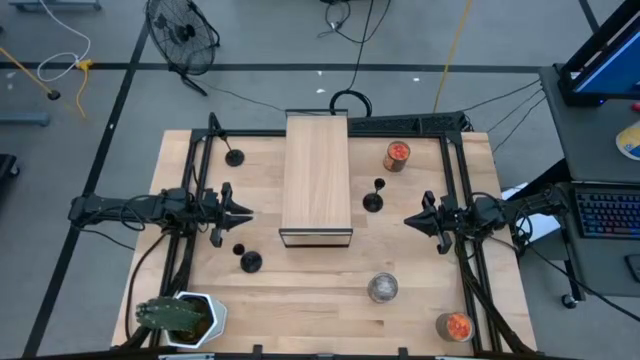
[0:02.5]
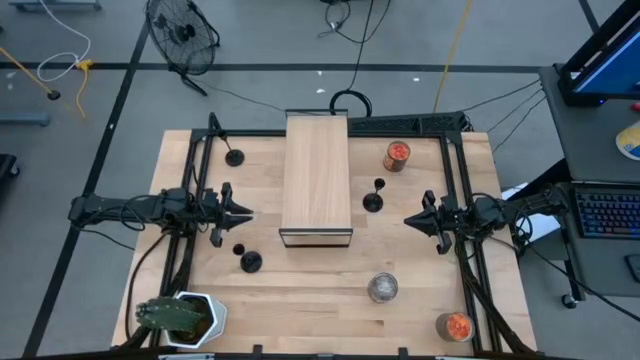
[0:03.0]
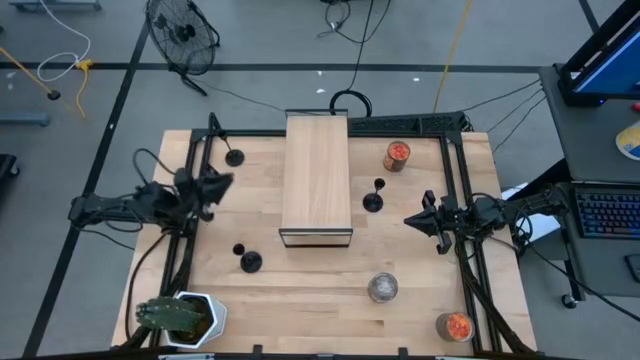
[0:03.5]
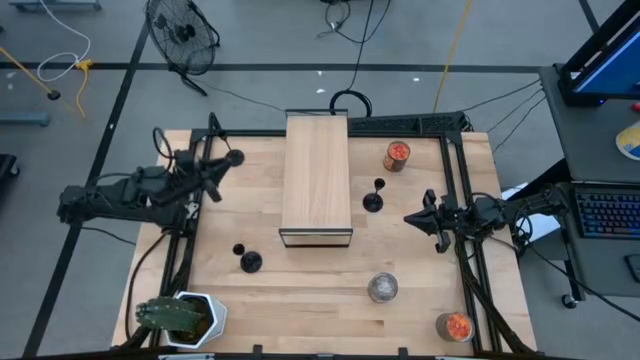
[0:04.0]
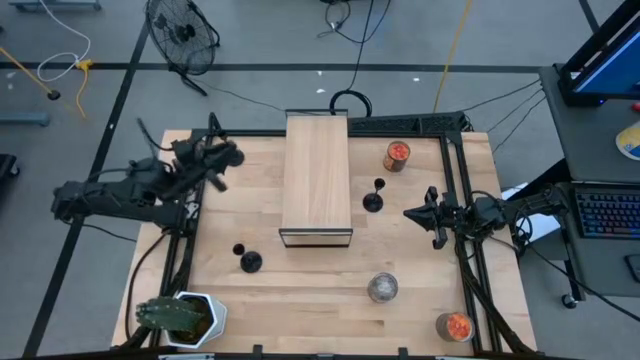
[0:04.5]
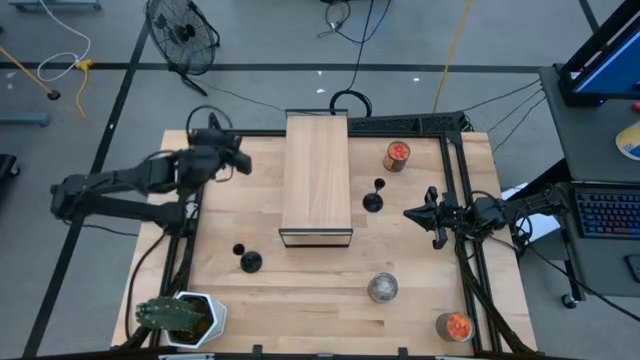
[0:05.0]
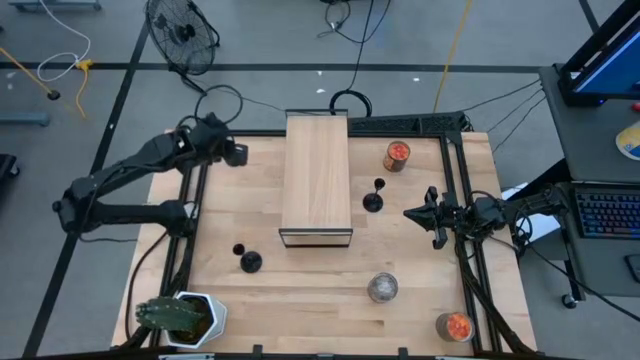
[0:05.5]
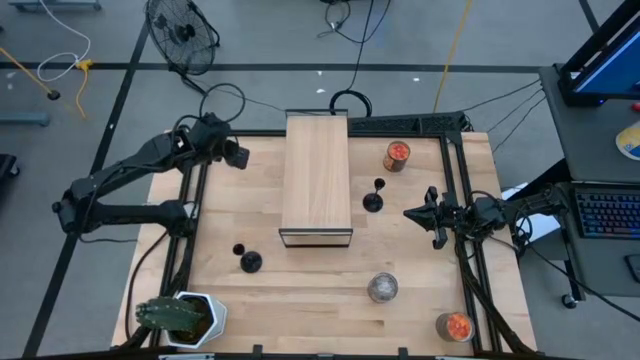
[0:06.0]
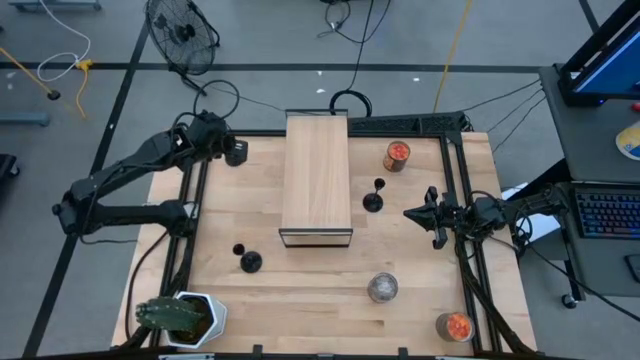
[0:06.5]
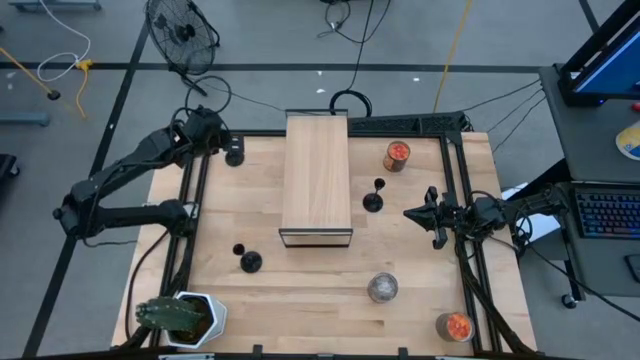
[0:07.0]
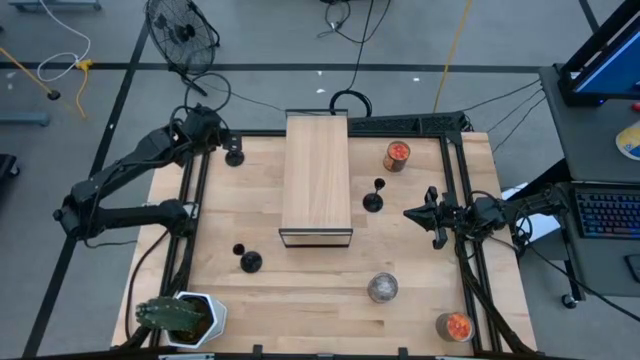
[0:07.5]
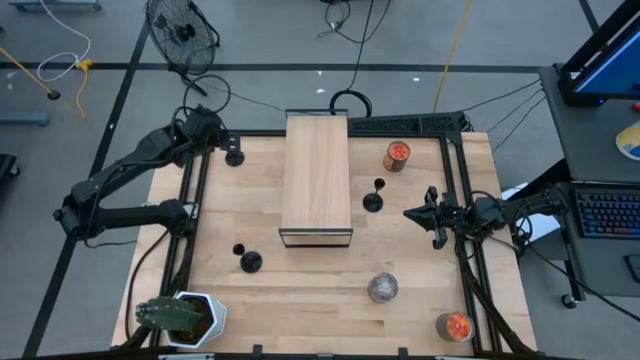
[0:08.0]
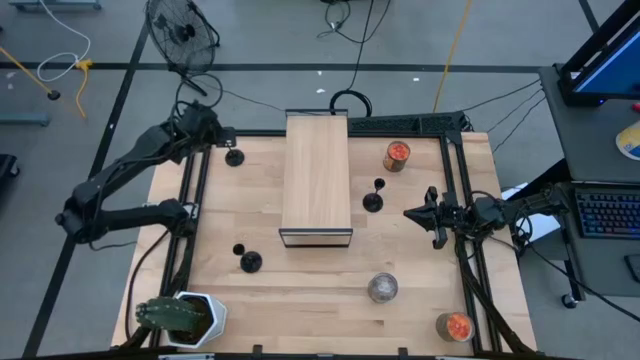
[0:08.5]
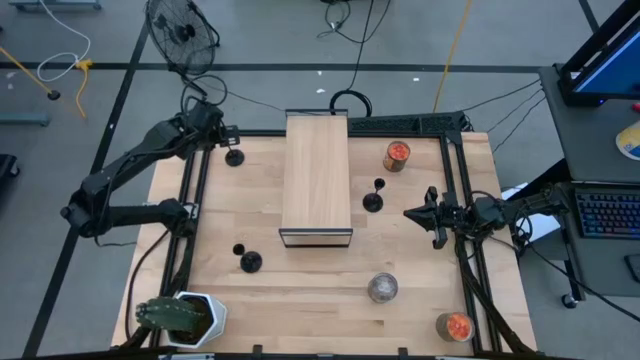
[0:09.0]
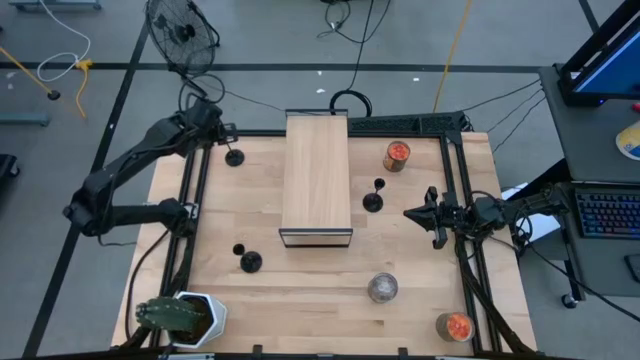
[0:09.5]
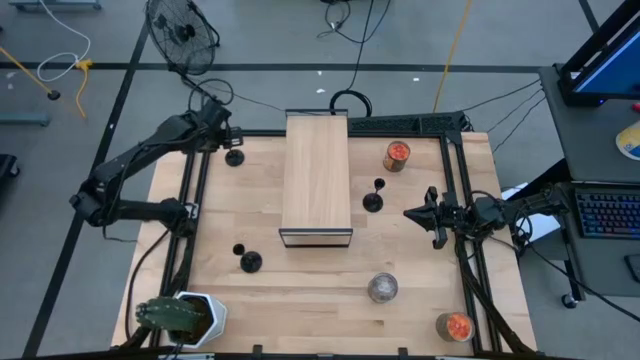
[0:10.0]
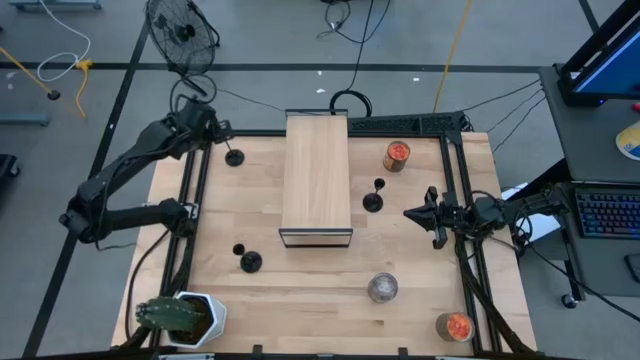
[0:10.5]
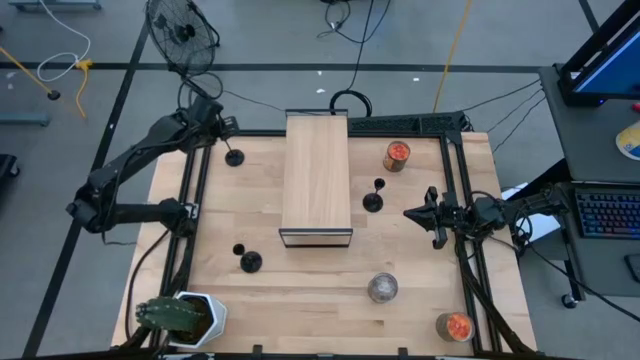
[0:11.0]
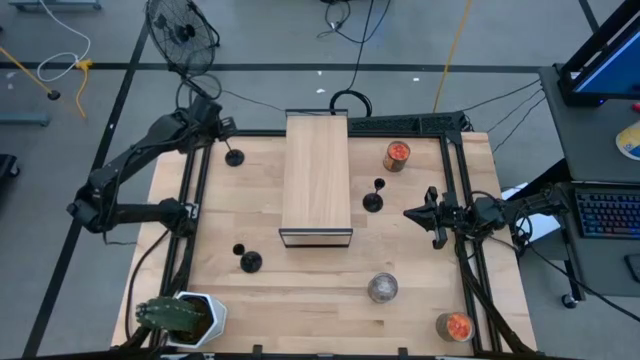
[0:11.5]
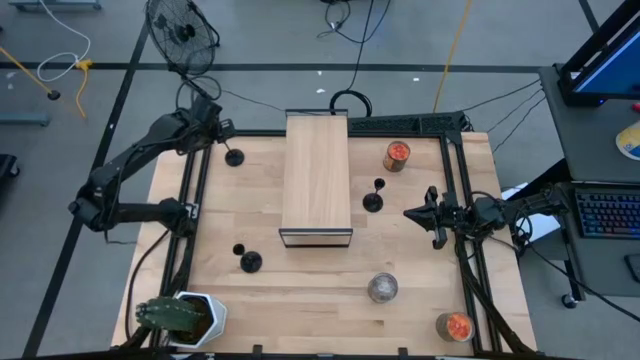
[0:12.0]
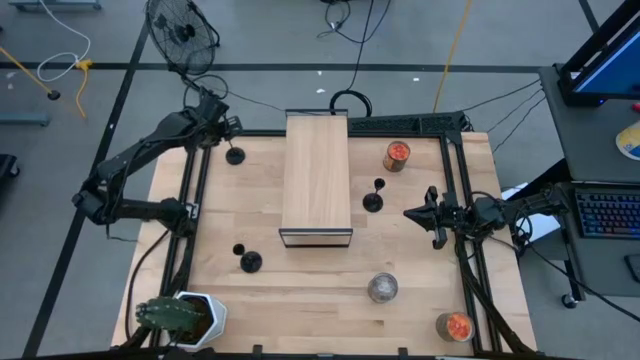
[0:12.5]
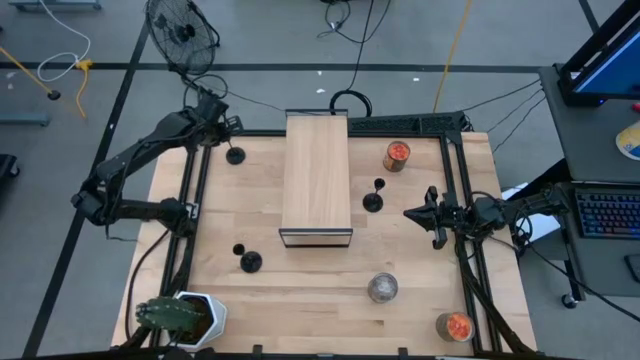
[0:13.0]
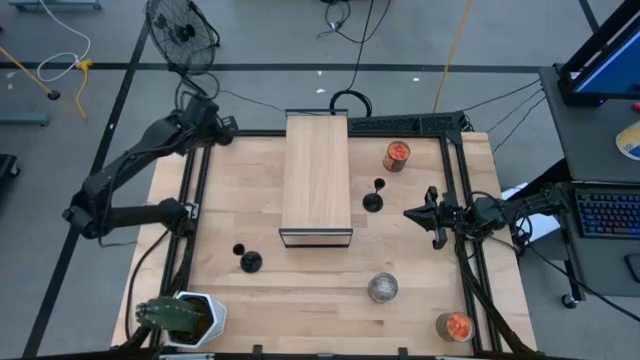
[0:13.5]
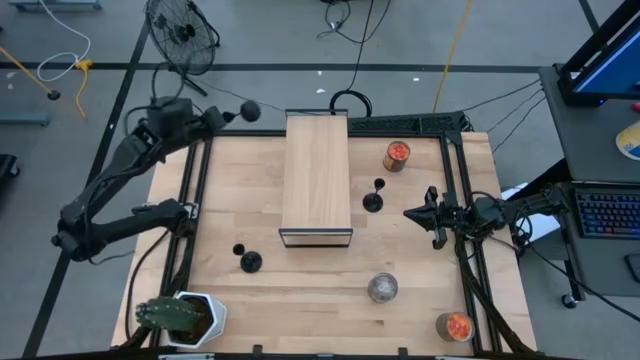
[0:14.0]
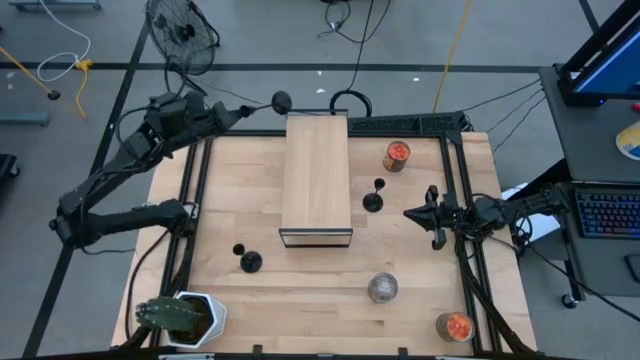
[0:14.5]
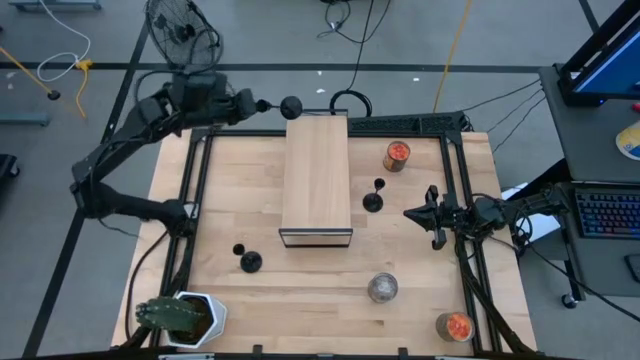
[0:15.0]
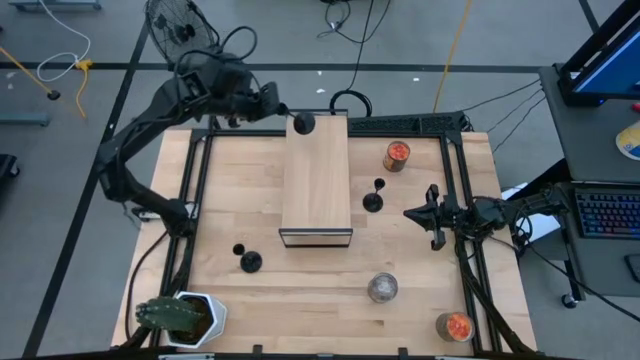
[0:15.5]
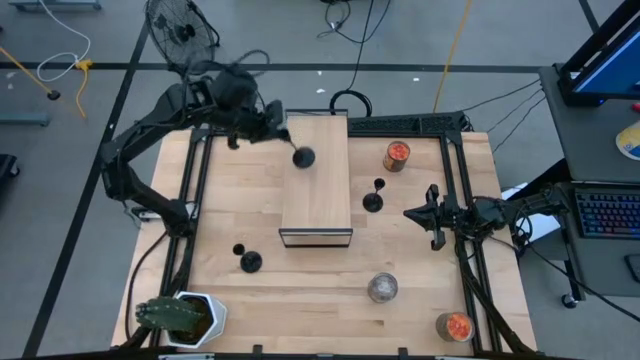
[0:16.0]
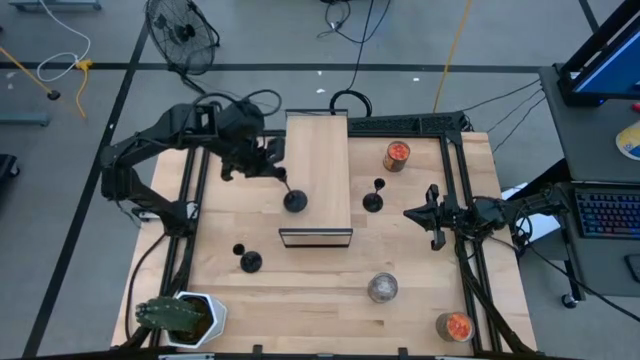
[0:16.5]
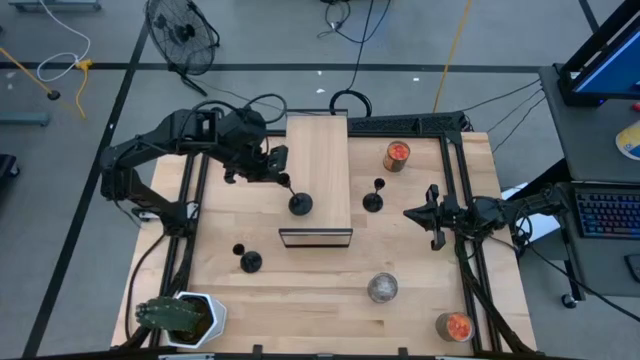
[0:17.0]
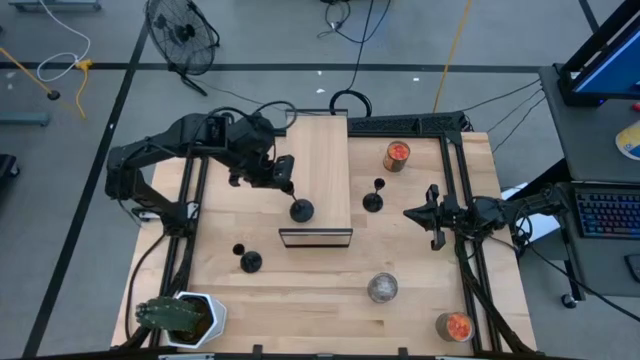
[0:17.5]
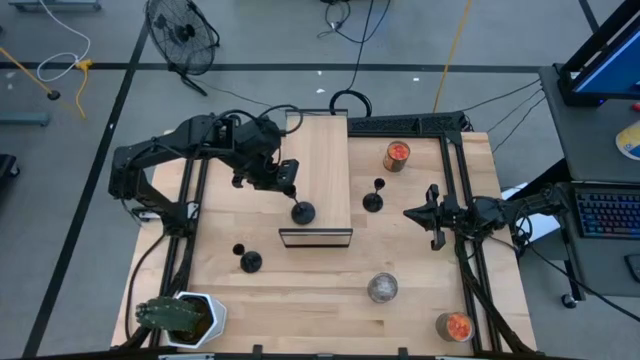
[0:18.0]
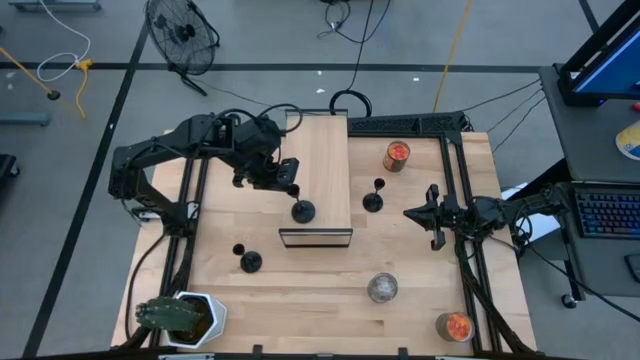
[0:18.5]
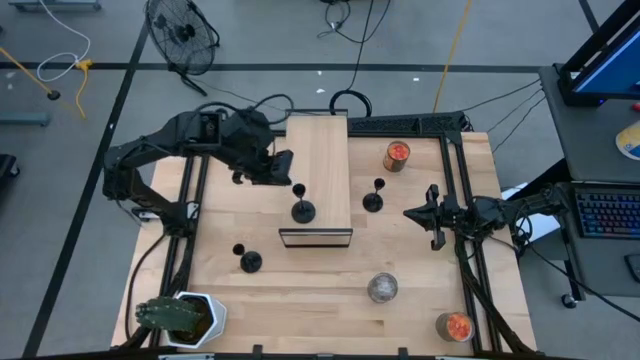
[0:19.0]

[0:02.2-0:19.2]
Task: Pick & Place candle stick holders
Put the top black candle holder on the shelf

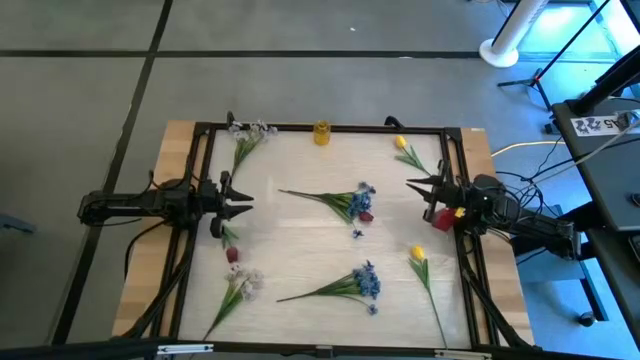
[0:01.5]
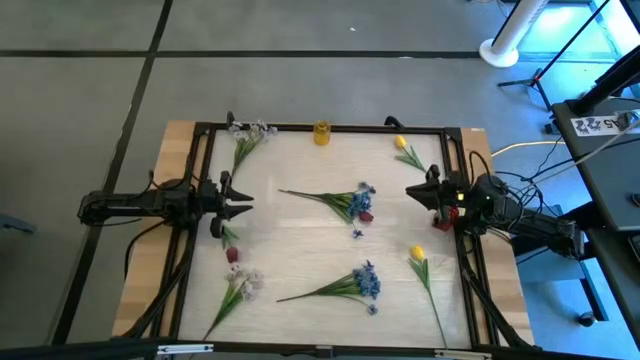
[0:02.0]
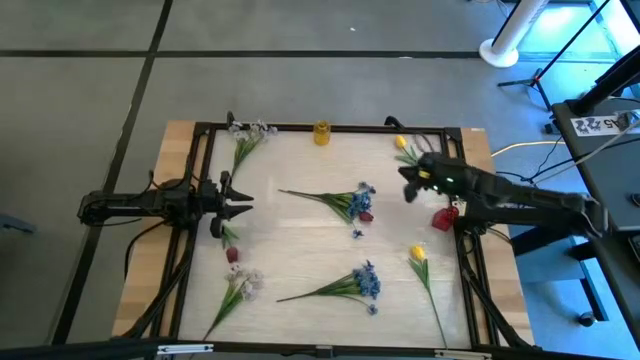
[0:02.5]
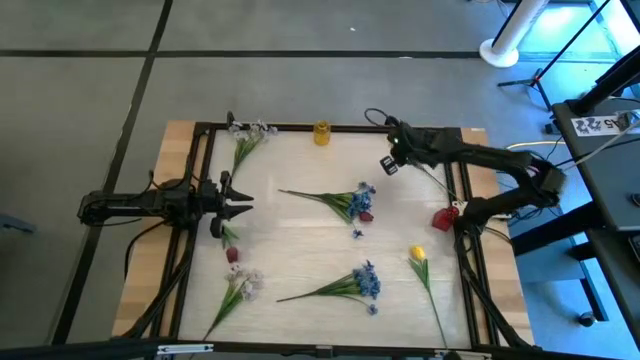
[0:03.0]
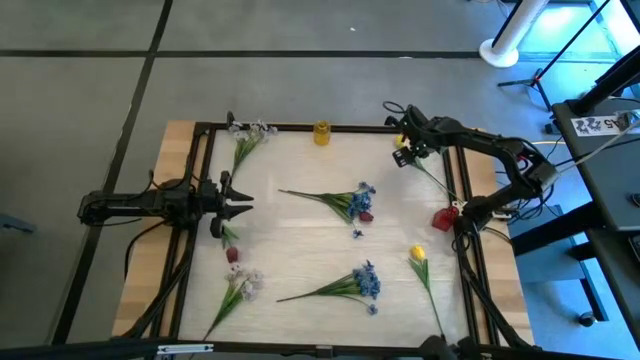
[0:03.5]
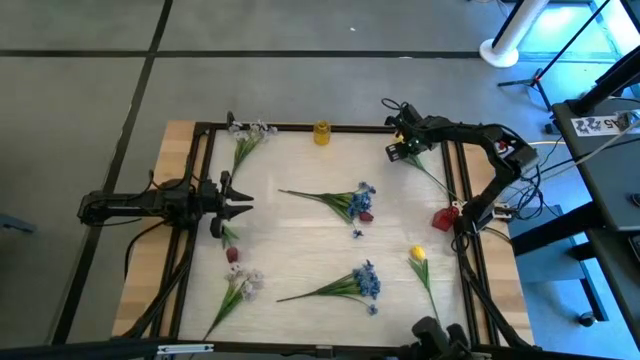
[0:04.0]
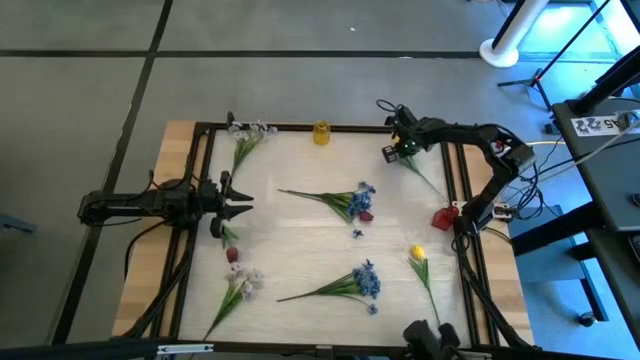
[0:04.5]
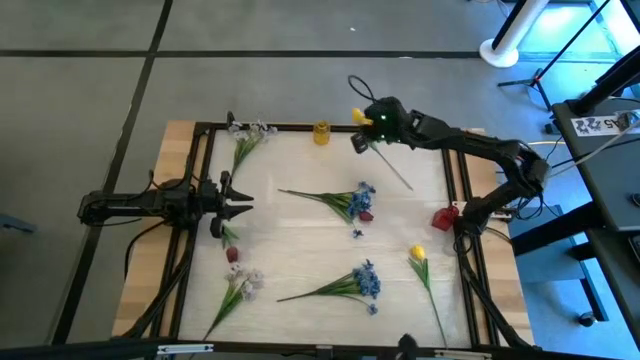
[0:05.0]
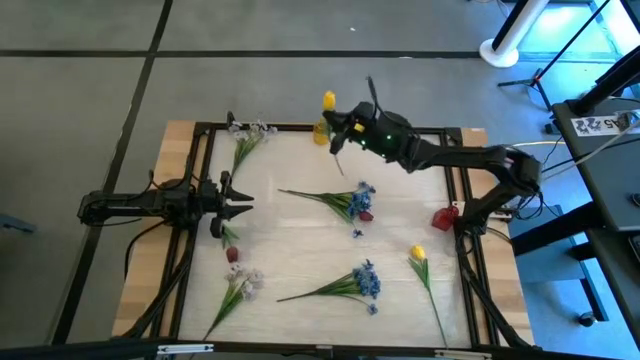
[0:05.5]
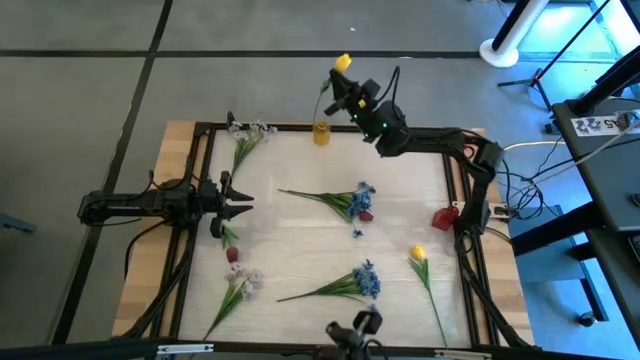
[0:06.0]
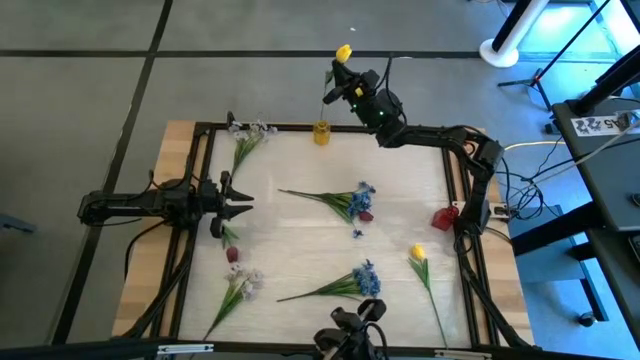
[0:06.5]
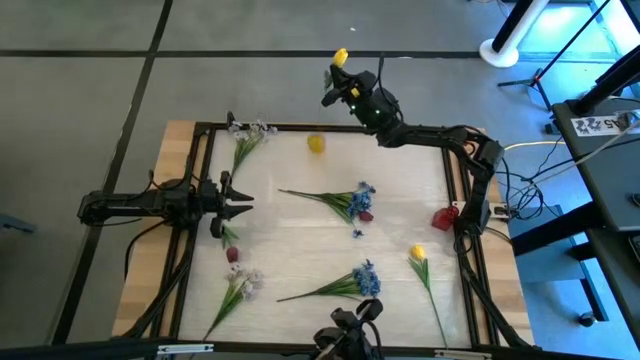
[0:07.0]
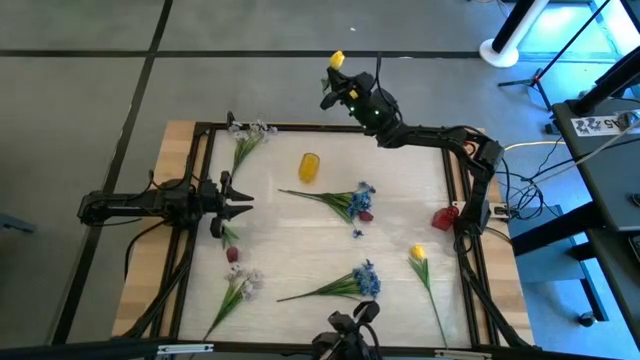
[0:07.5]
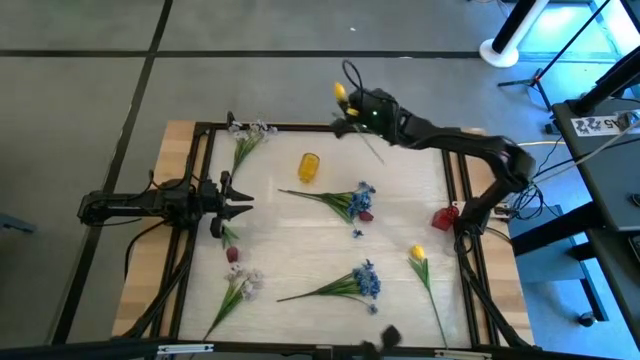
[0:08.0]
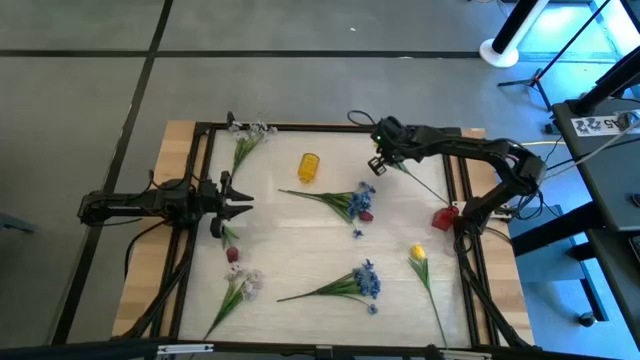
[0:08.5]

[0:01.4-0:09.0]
Task: Sort flowers into vase by color
Put the top yellow flower into the yellow vase
